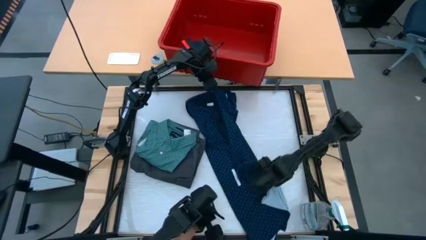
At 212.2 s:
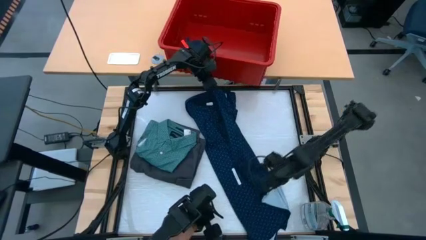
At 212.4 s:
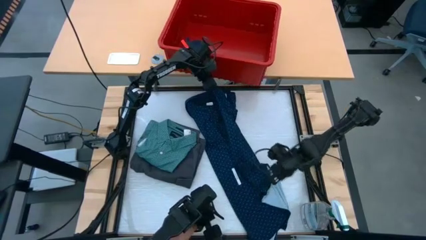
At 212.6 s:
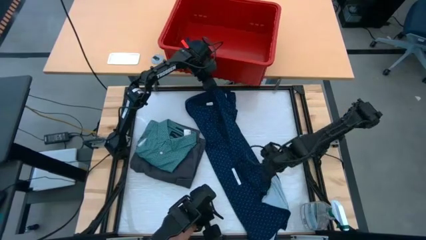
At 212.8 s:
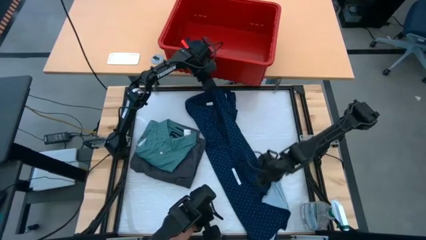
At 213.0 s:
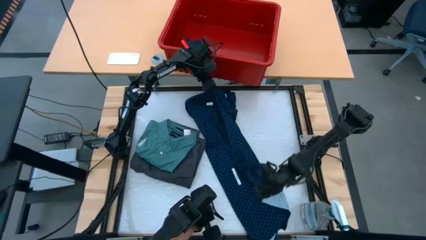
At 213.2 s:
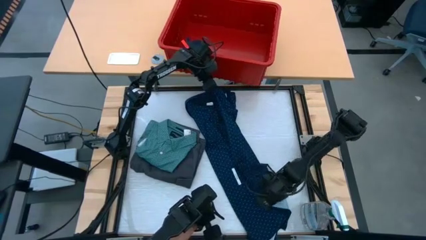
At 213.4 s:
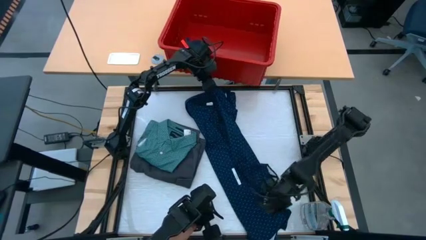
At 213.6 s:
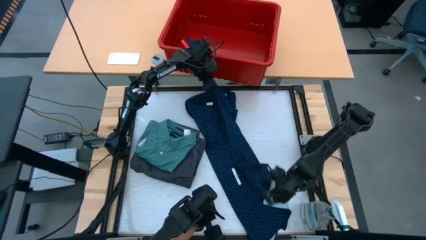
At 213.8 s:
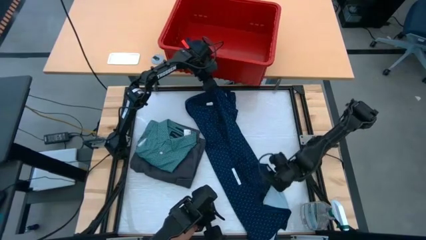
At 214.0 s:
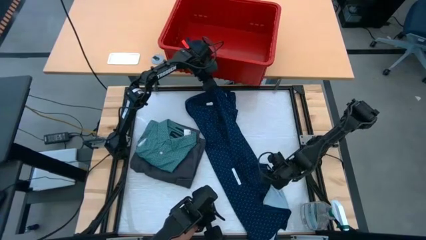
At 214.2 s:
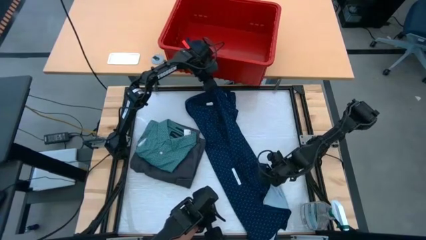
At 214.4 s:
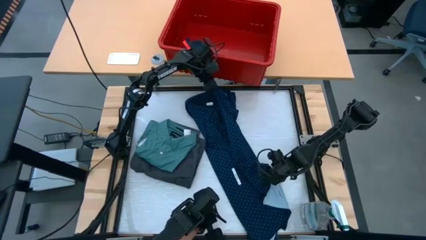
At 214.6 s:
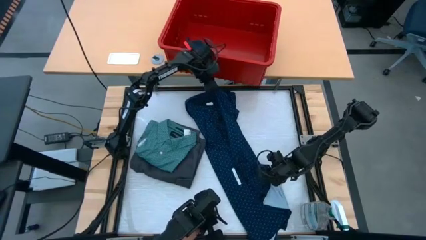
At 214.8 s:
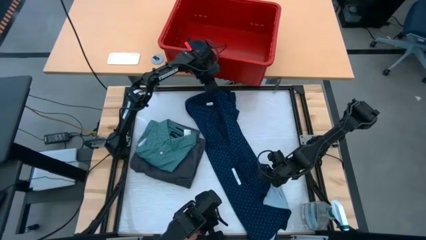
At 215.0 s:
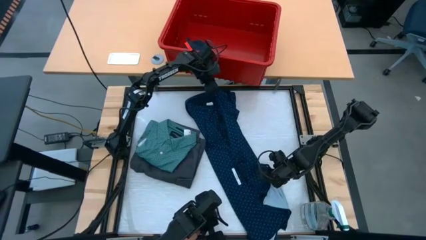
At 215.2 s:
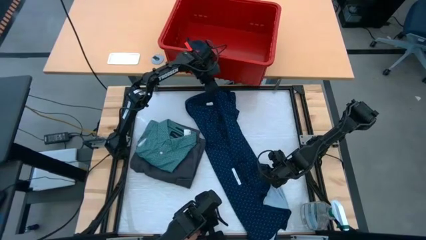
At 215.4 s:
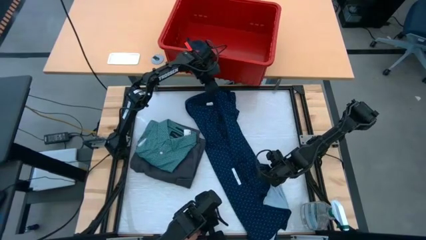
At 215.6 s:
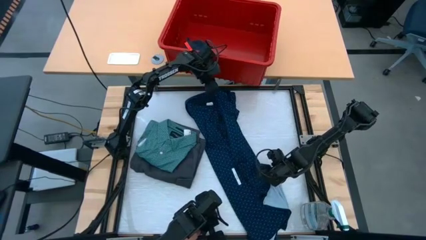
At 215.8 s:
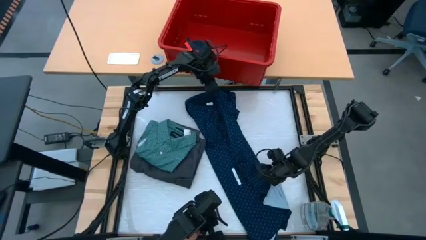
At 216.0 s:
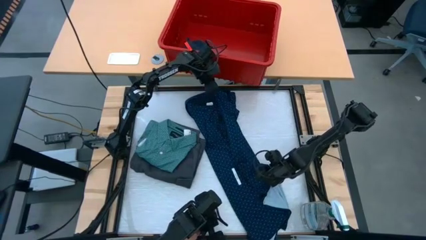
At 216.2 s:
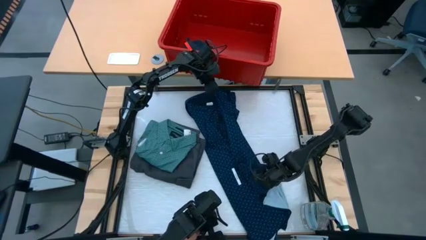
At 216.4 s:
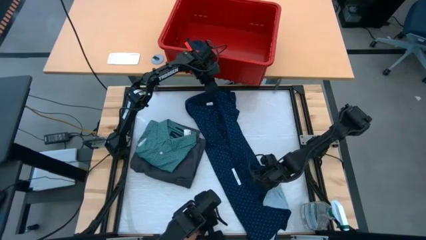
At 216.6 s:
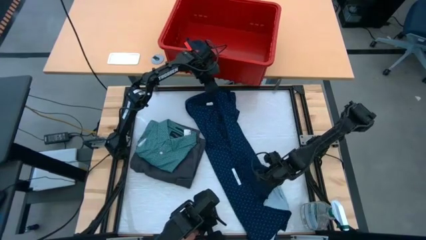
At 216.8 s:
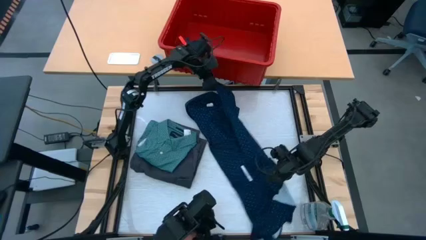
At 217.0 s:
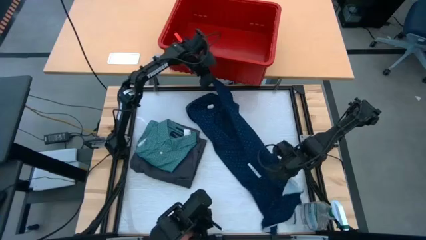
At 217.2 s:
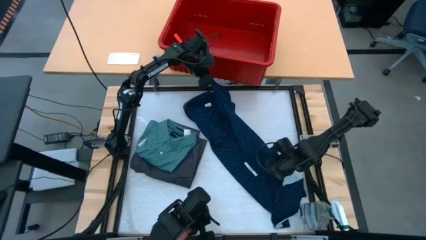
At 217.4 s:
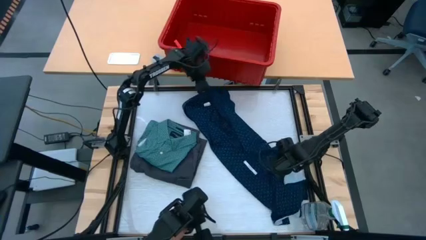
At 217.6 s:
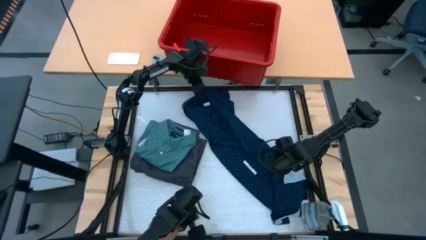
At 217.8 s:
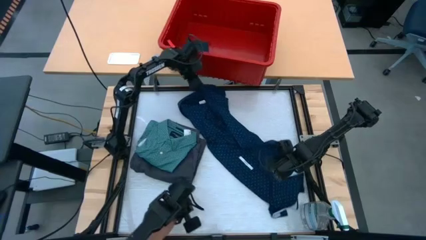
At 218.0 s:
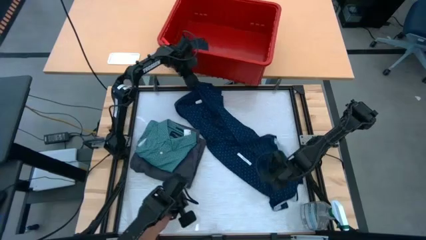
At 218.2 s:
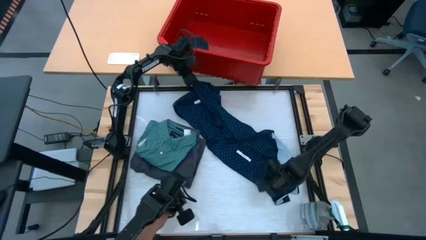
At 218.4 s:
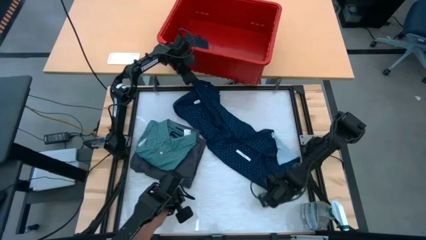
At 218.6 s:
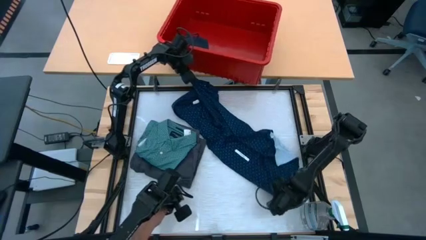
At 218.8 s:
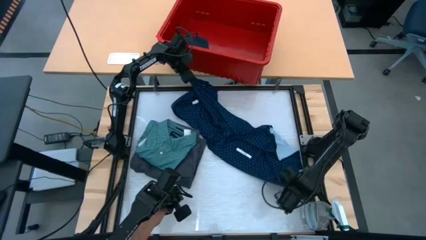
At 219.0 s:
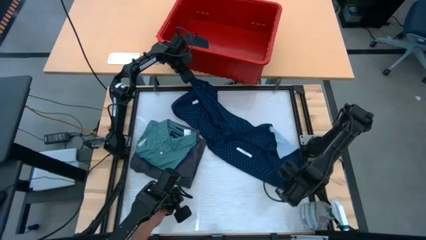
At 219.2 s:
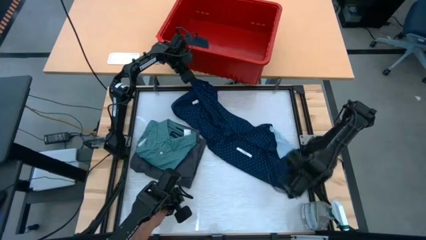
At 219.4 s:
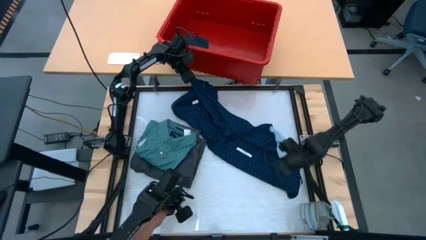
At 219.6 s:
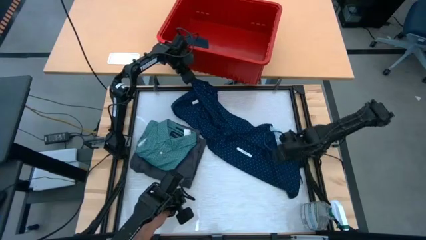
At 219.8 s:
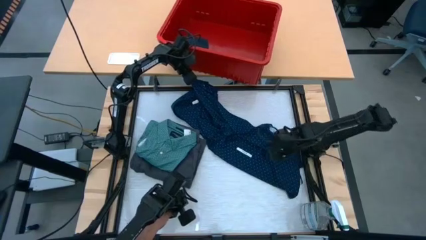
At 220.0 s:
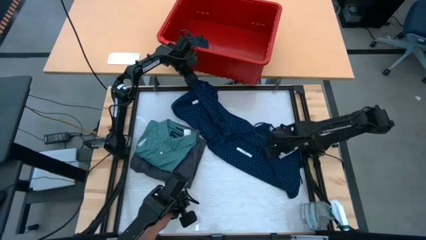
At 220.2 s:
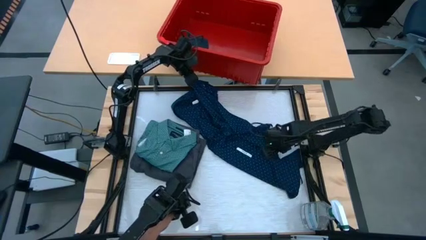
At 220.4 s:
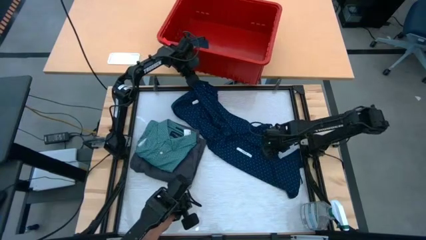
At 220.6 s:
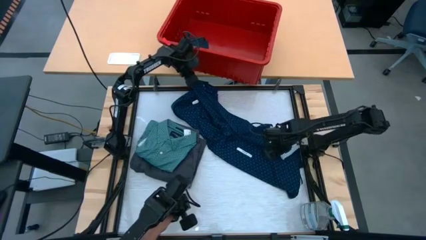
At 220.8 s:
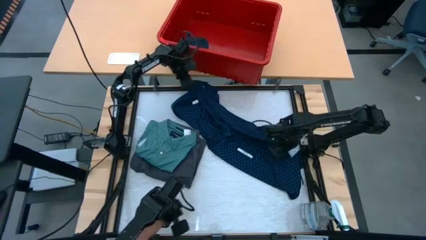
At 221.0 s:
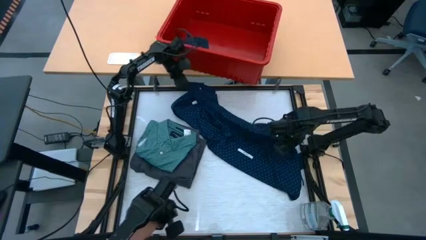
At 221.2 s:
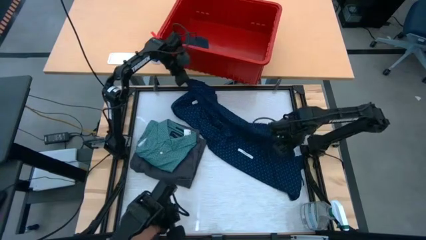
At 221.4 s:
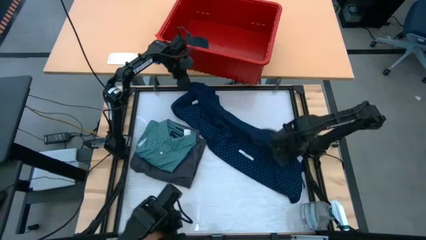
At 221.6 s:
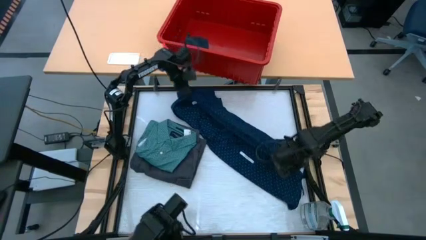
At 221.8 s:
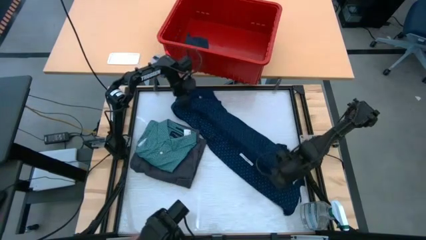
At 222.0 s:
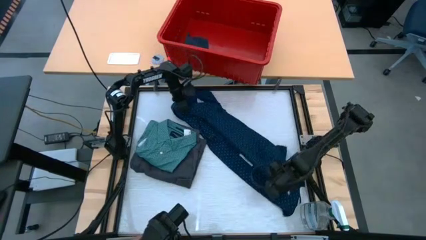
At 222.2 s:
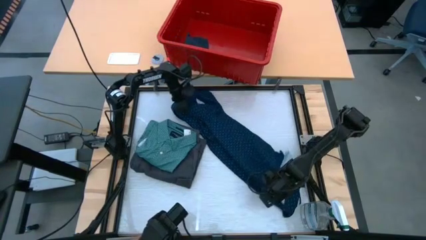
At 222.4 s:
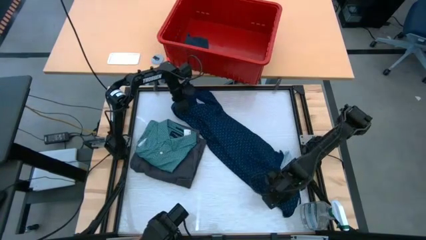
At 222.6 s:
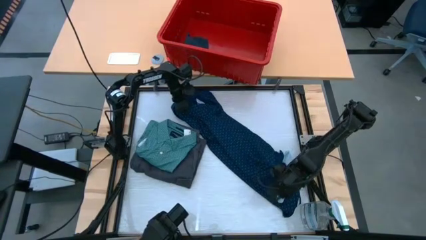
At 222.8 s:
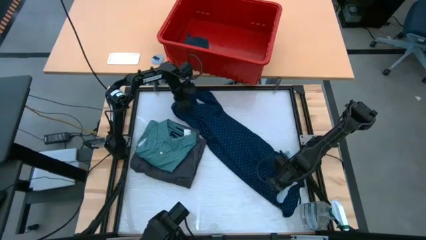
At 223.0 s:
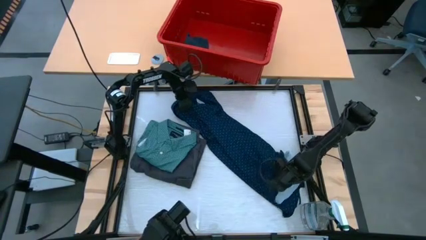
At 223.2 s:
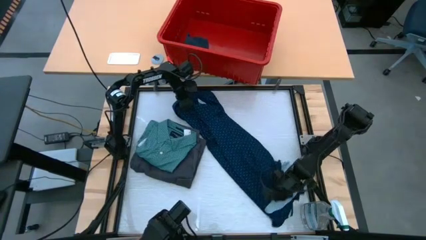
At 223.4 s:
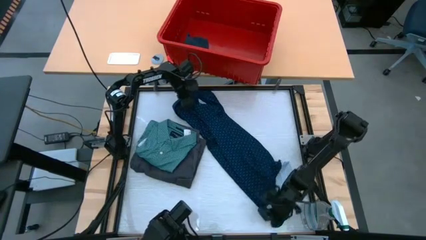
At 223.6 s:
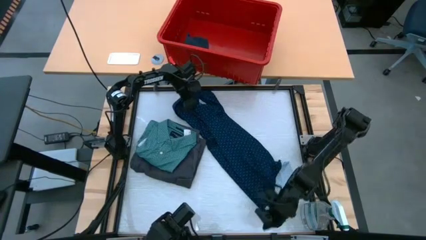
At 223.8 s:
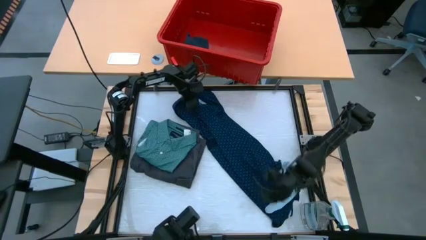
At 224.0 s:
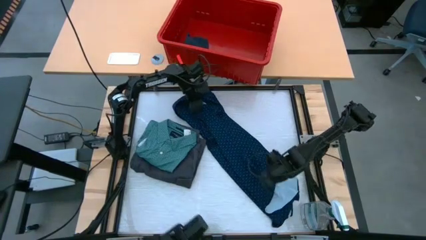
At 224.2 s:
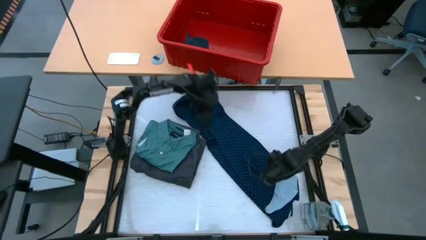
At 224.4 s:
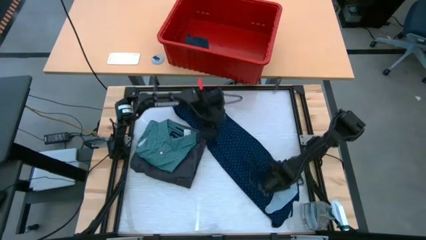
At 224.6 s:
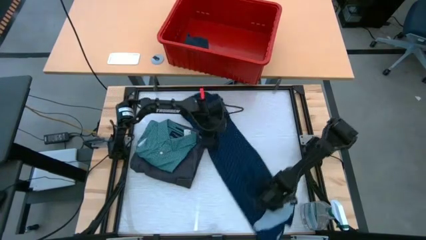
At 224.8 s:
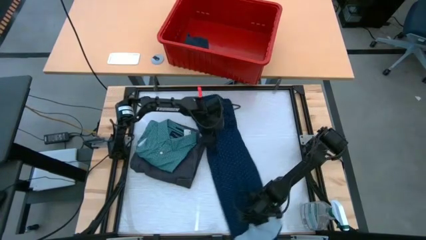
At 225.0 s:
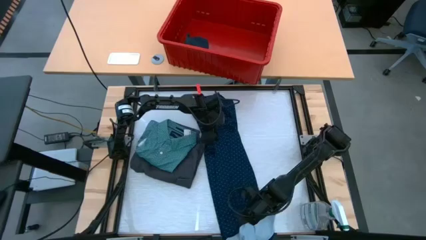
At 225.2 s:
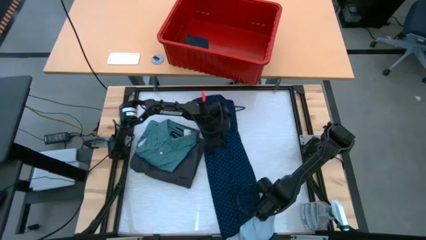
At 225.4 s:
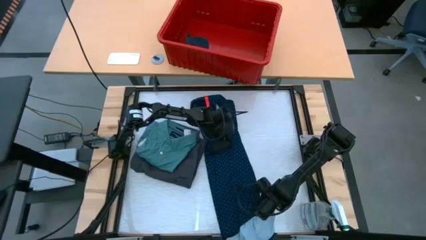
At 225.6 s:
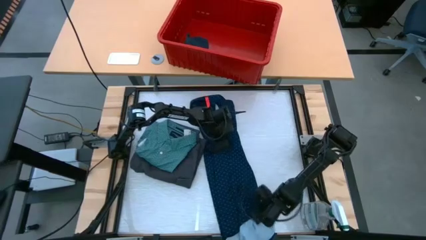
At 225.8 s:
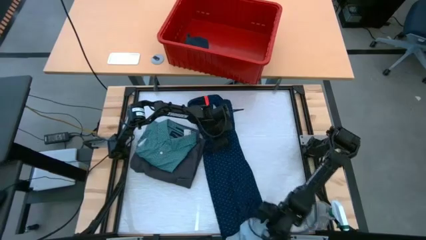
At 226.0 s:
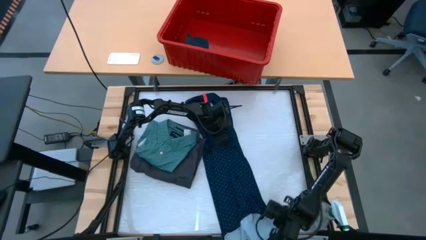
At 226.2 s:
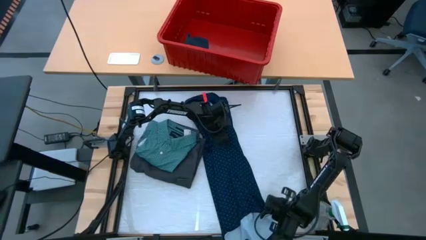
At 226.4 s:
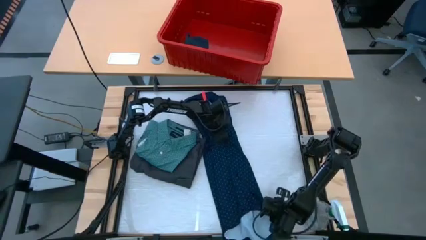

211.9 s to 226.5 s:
Task: Fold laundry
Fold the dark blue polo

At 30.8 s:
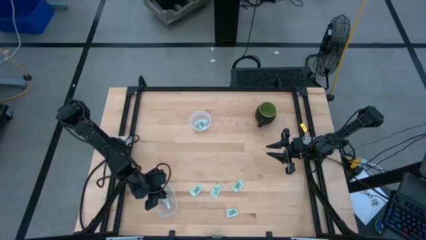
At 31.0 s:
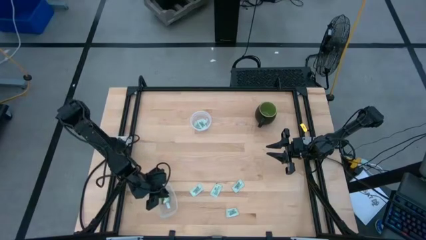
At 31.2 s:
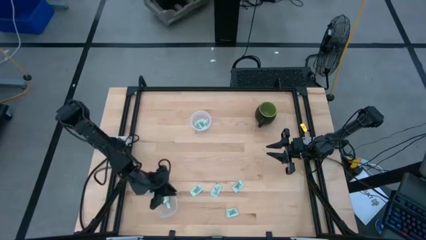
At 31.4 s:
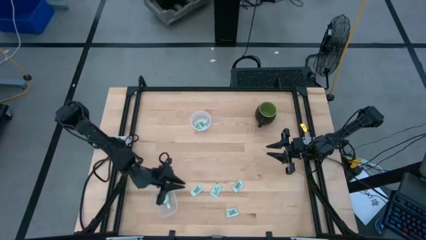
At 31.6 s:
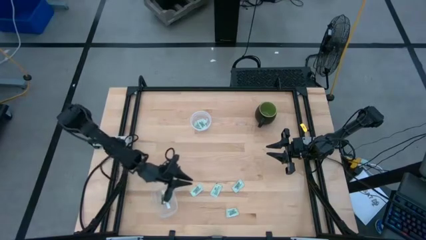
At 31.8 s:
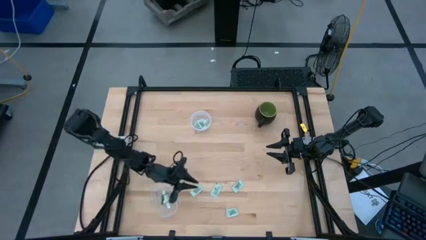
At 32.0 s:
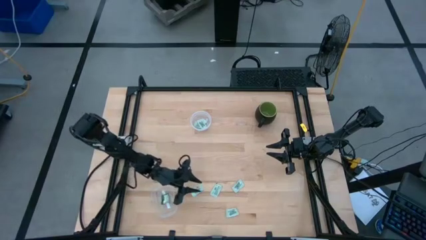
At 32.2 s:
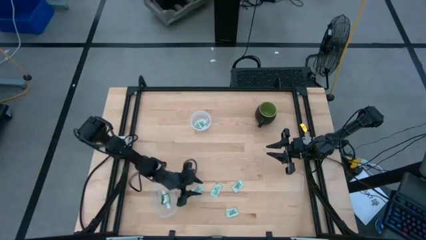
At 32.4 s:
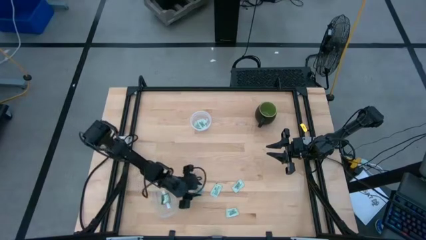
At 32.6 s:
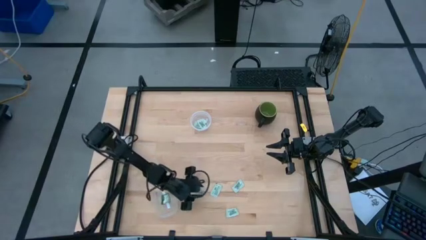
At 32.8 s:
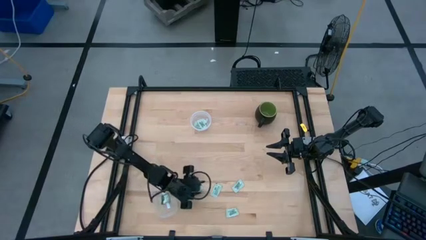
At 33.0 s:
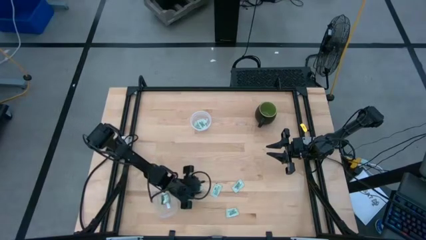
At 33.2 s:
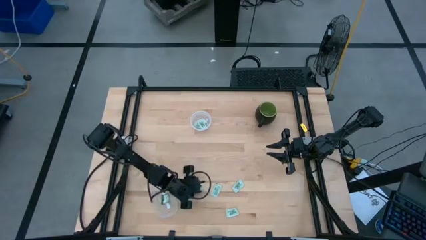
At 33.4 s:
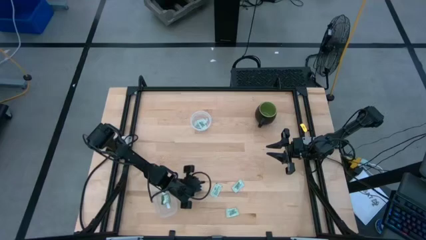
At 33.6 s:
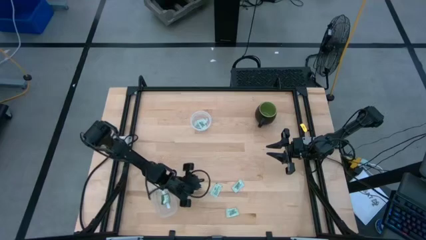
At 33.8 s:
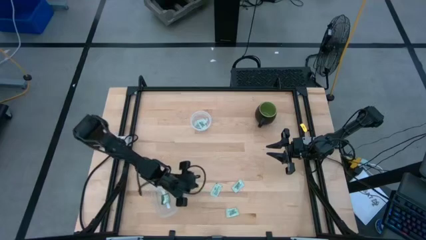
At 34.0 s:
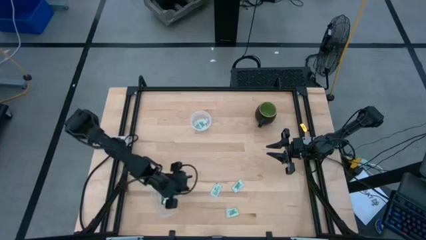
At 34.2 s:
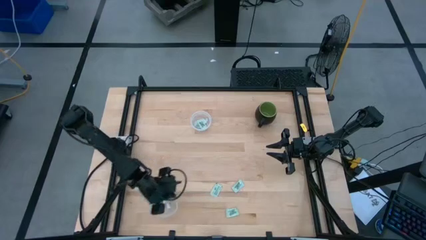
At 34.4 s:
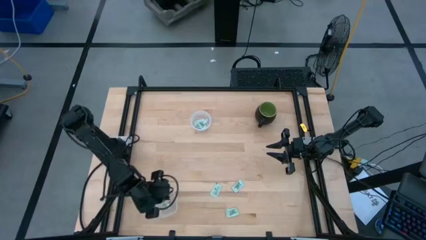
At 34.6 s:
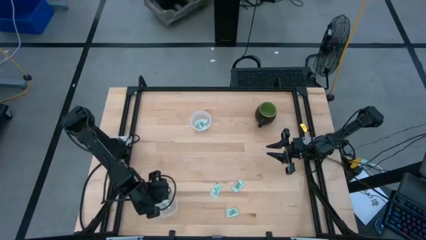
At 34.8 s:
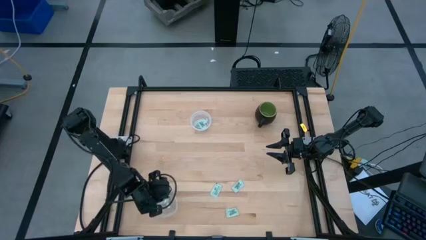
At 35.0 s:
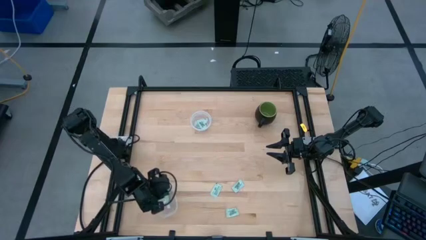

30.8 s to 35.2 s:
Task: Pick and place Stevia / Truvia into bins
Put the stevia packet into the transparent rectangle container
